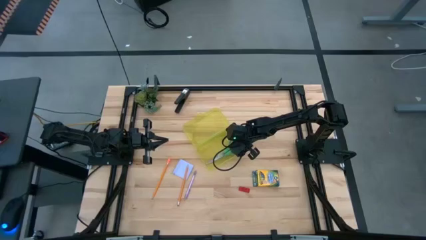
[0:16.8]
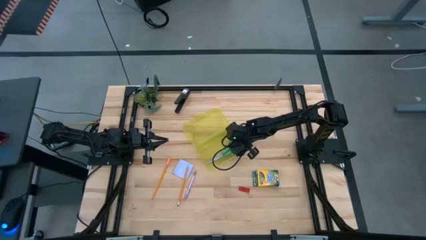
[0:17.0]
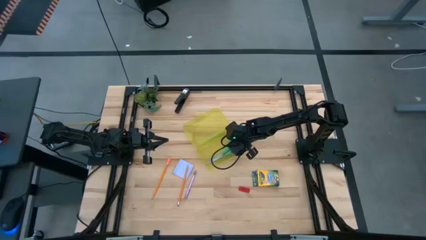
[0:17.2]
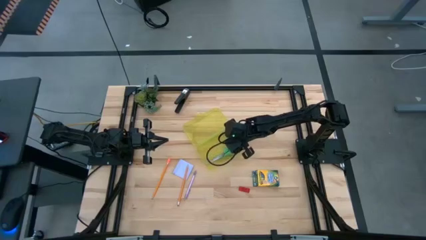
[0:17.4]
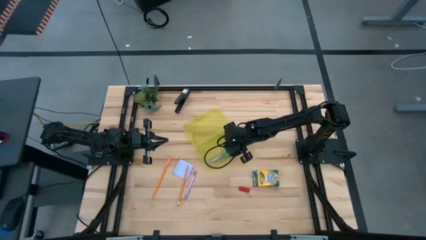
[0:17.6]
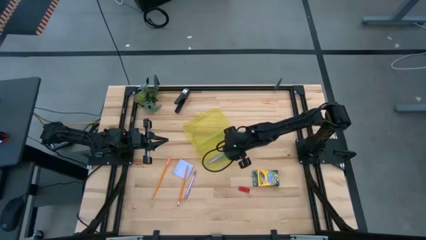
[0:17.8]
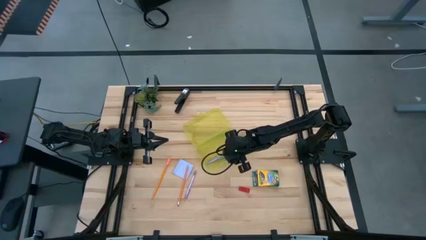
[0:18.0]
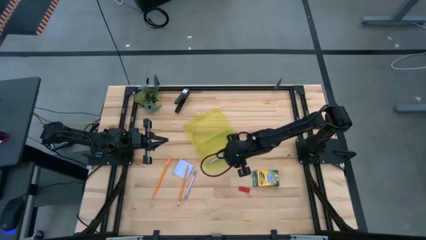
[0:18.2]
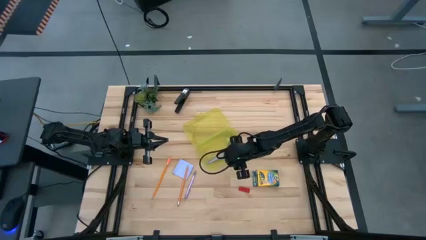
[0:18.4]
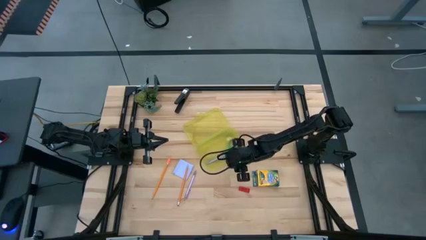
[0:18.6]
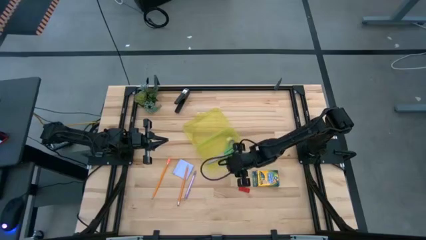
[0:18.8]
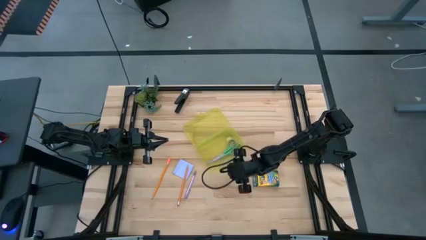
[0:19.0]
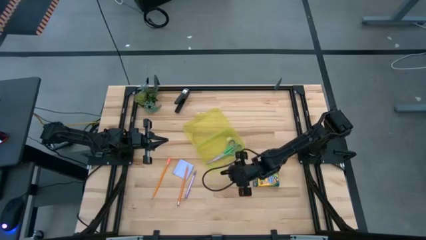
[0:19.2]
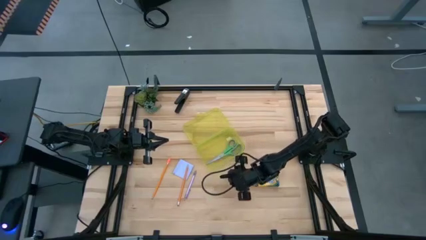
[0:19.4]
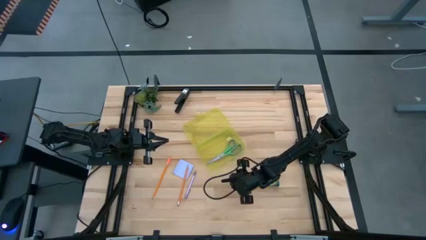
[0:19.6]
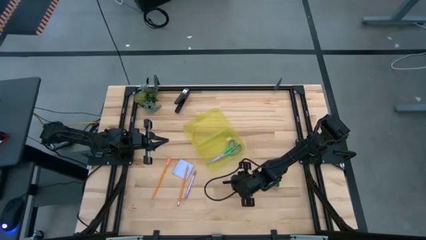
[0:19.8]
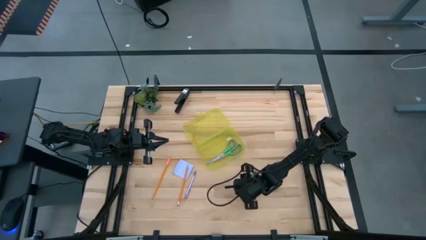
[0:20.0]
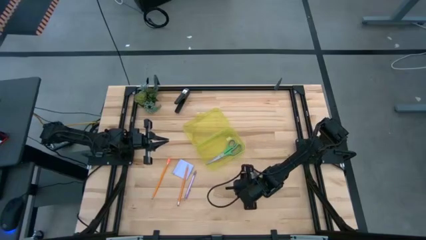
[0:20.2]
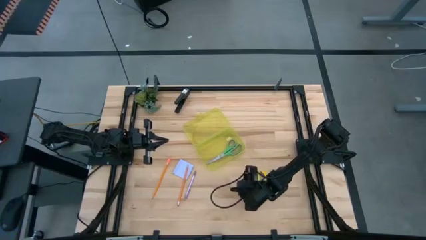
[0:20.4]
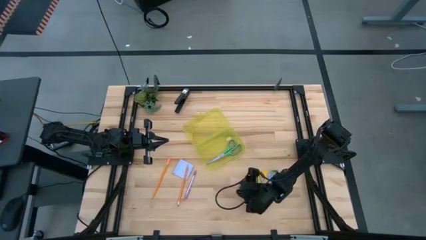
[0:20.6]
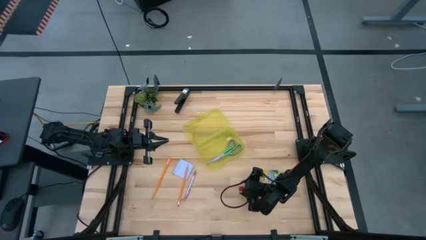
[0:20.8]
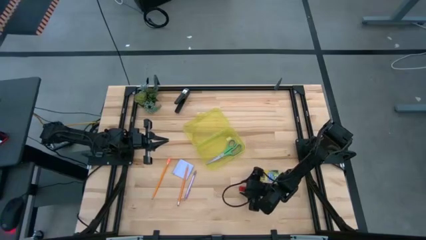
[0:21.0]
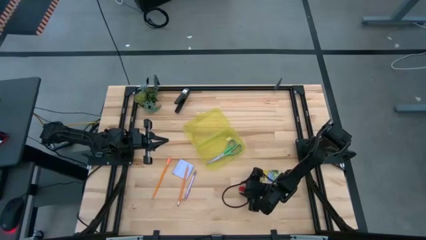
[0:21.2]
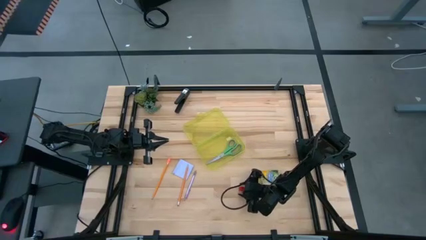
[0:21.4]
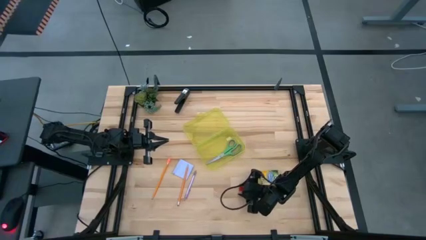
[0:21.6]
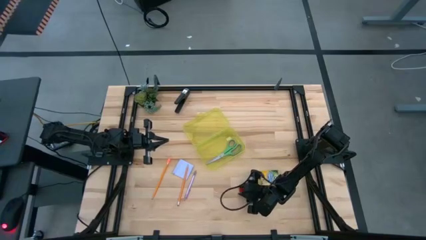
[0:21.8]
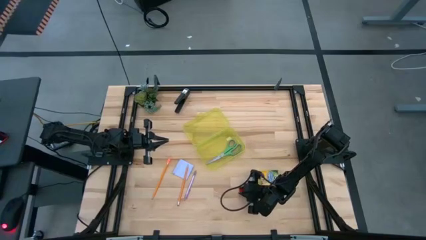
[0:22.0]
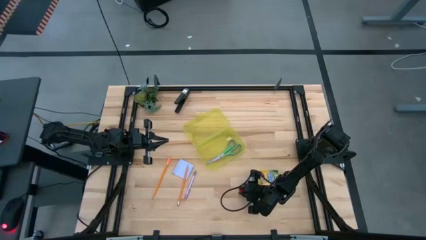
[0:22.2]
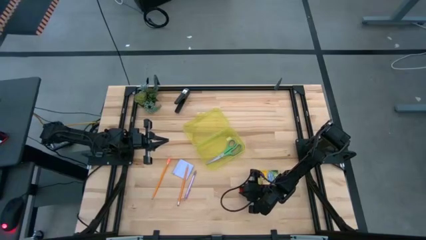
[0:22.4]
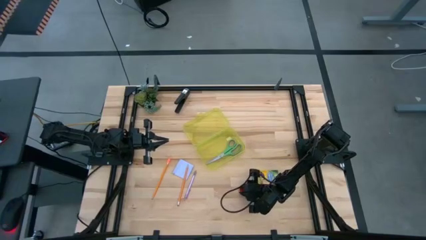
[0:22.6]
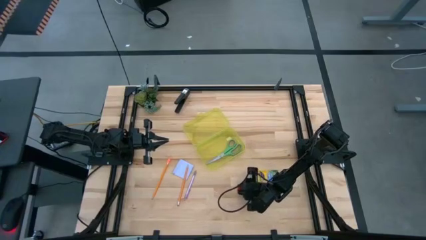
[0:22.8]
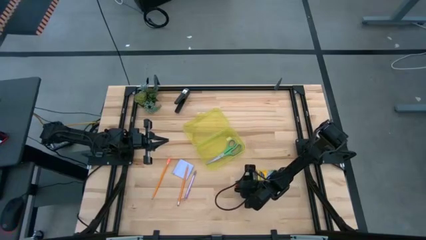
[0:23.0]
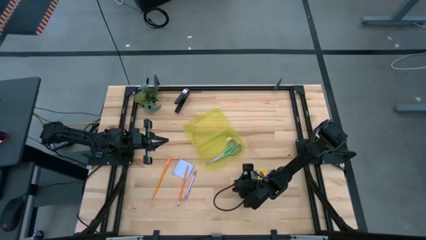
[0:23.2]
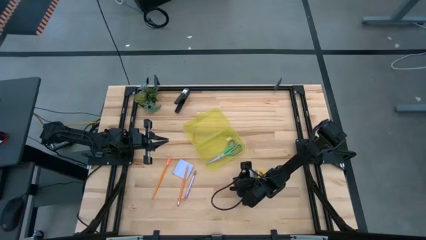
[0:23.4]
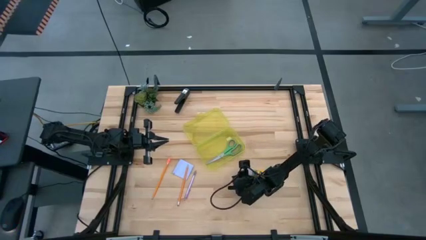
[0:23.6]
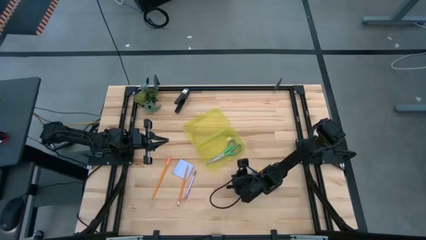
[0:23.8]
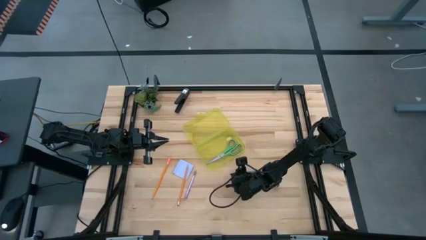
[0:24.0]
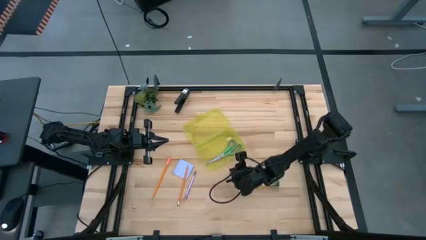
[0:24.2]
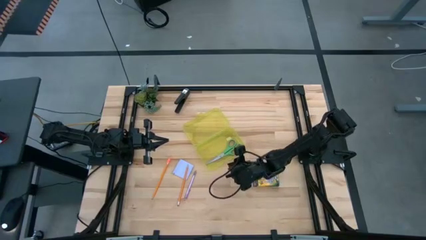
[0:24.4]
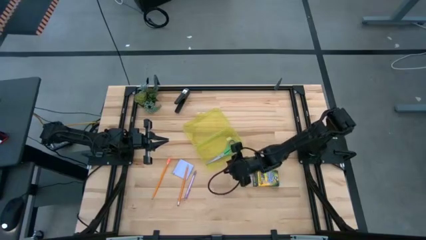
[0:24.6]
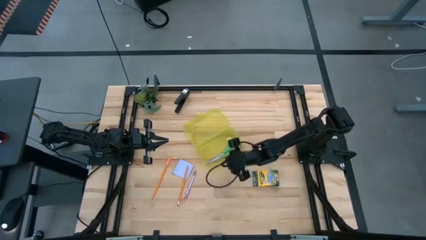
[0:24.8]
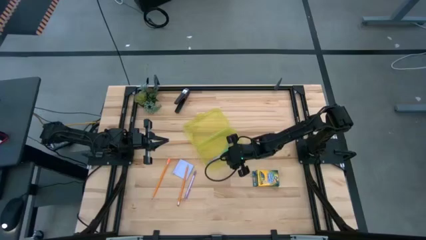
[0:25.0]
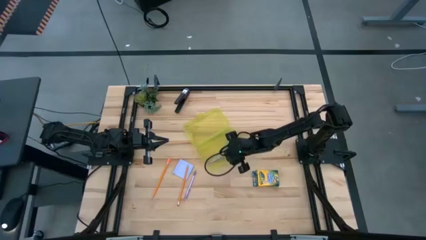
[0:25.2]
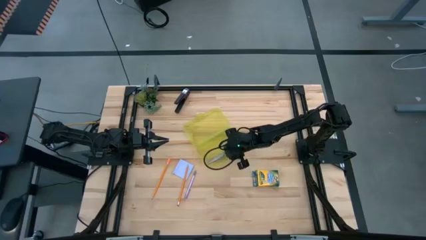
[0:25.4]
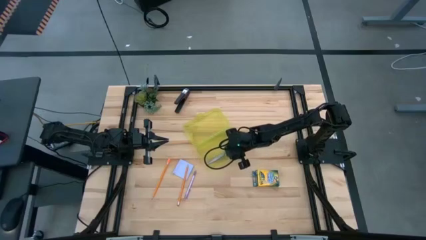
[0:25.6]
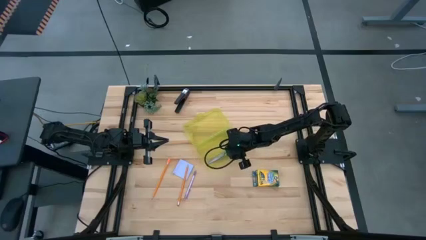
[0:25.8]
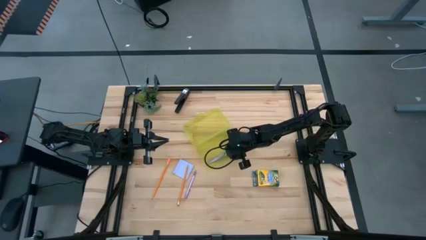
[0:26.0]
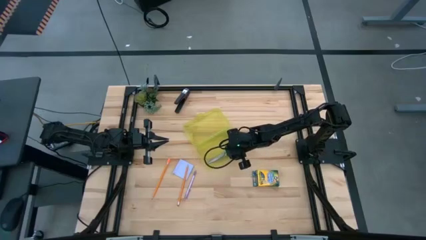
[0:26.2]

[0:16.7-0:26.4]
Task: Pack school essentials
Put the red eraser into the yellow supply box

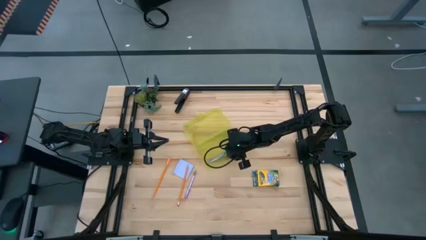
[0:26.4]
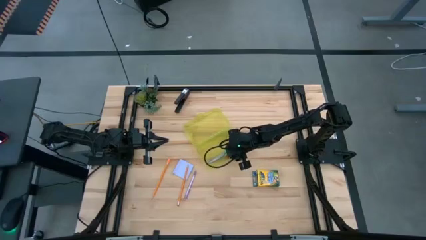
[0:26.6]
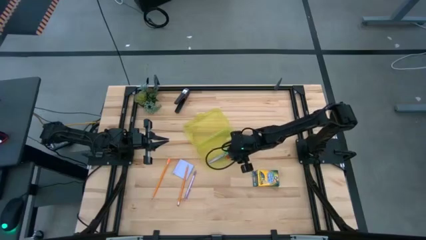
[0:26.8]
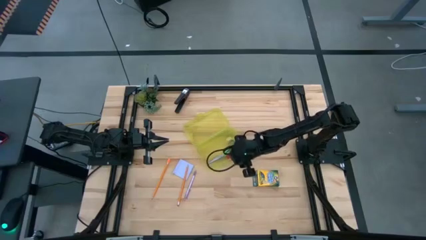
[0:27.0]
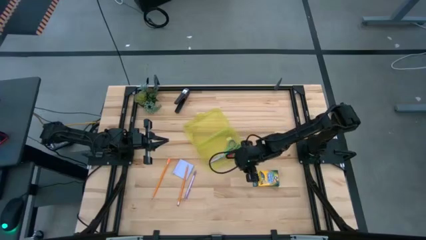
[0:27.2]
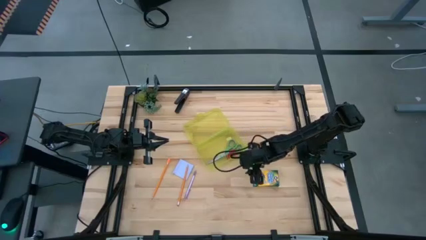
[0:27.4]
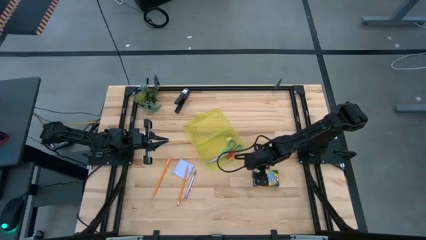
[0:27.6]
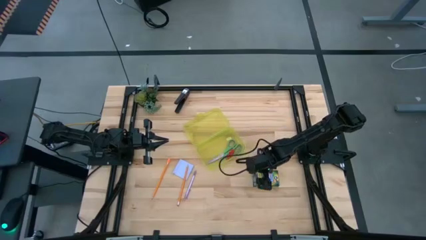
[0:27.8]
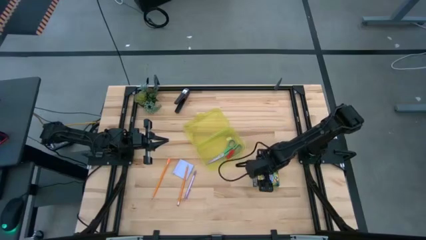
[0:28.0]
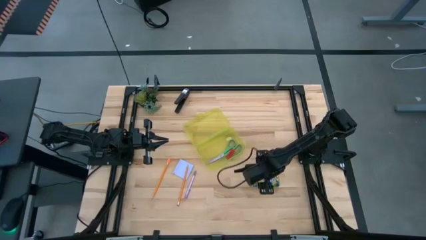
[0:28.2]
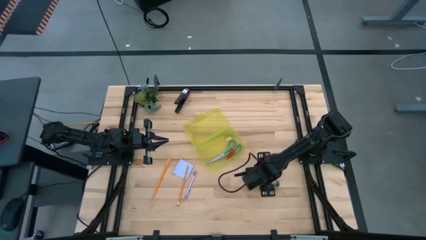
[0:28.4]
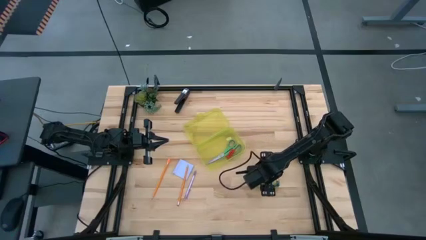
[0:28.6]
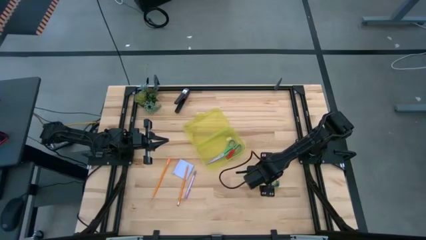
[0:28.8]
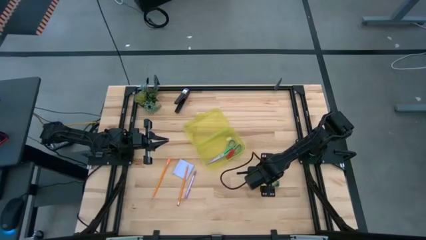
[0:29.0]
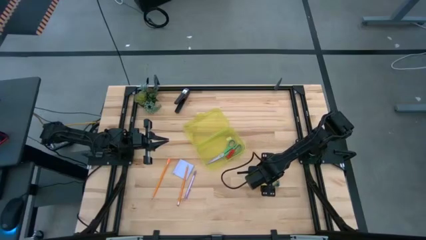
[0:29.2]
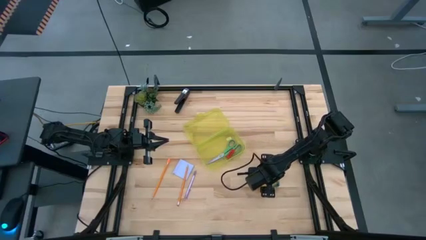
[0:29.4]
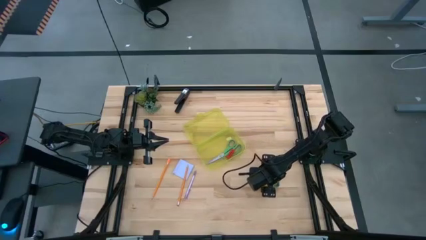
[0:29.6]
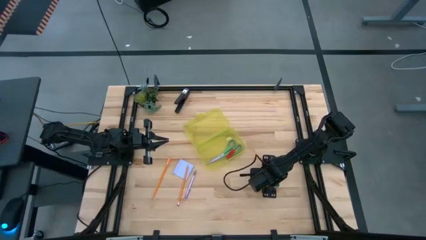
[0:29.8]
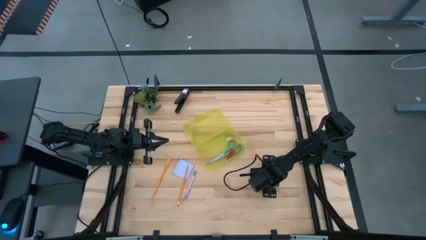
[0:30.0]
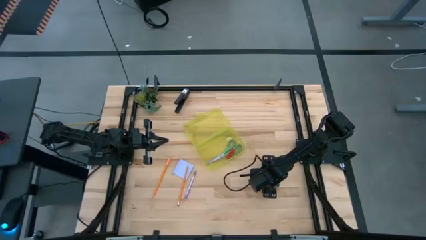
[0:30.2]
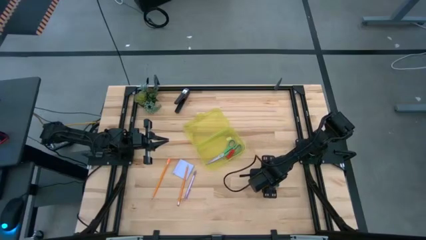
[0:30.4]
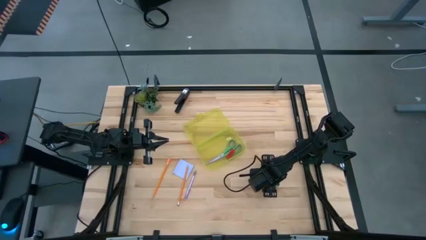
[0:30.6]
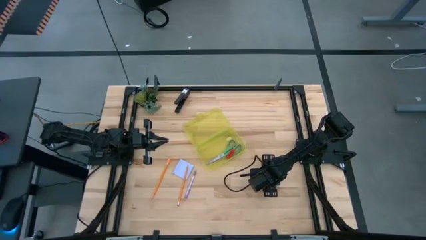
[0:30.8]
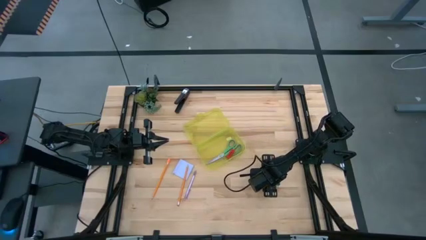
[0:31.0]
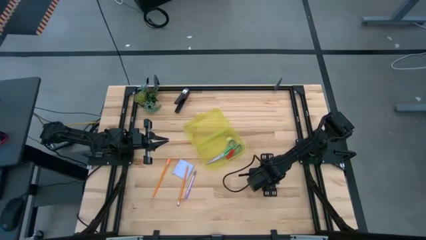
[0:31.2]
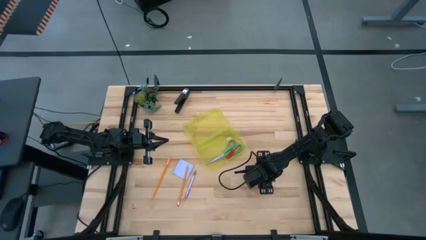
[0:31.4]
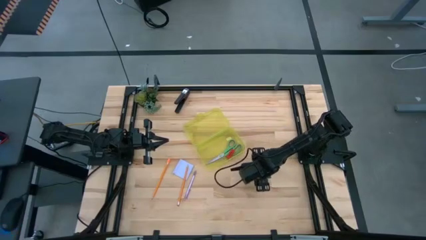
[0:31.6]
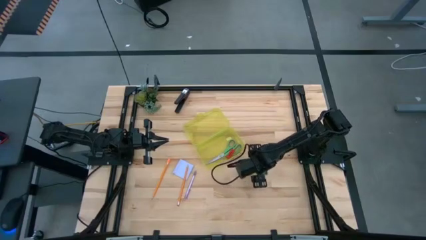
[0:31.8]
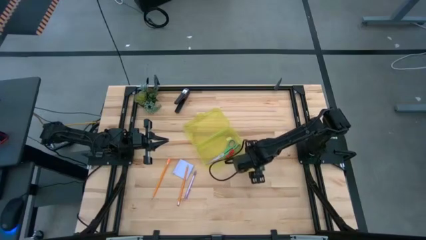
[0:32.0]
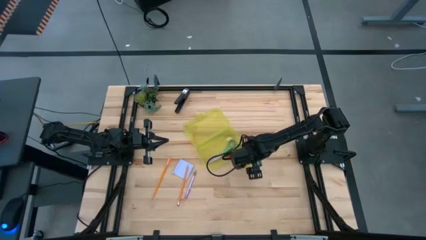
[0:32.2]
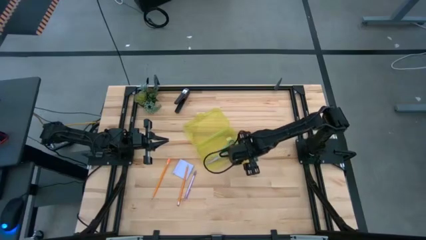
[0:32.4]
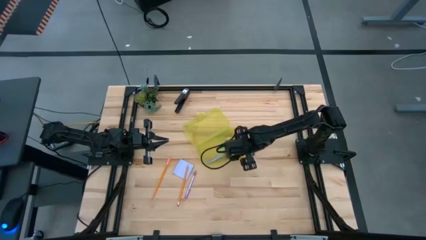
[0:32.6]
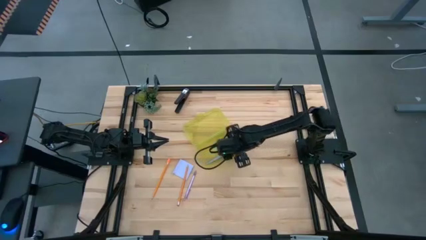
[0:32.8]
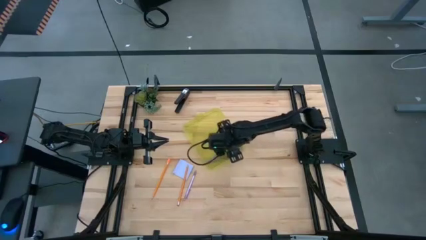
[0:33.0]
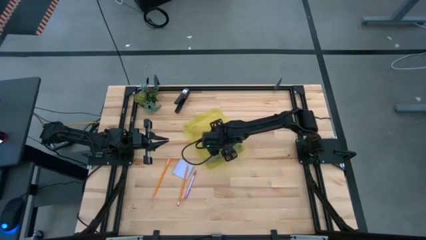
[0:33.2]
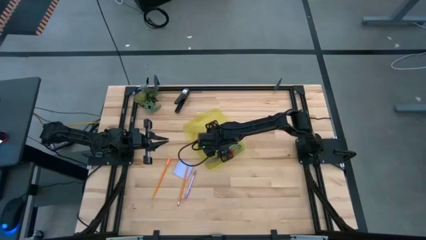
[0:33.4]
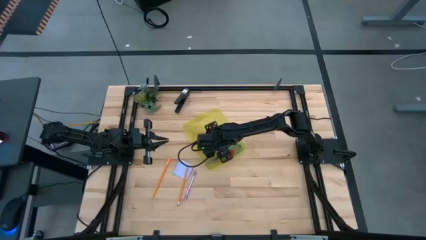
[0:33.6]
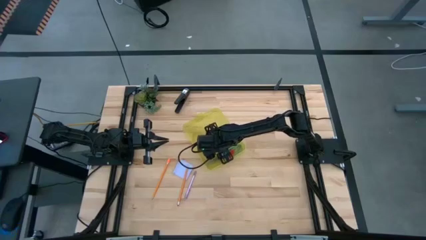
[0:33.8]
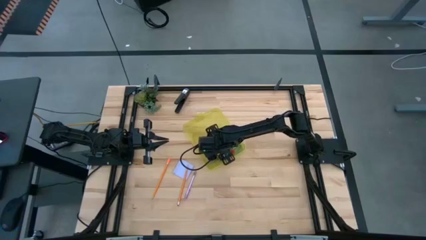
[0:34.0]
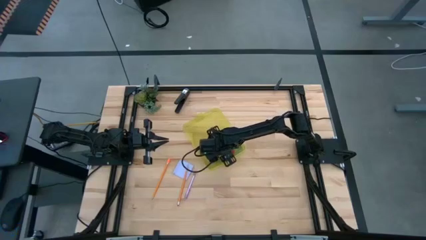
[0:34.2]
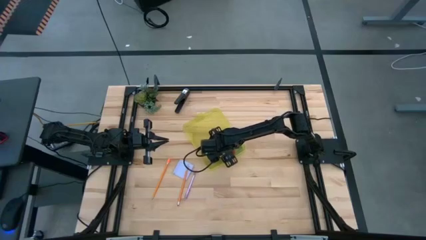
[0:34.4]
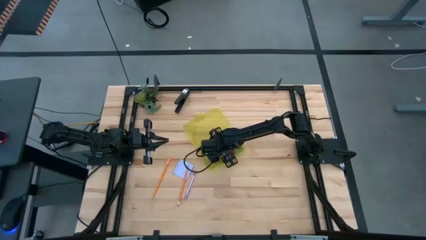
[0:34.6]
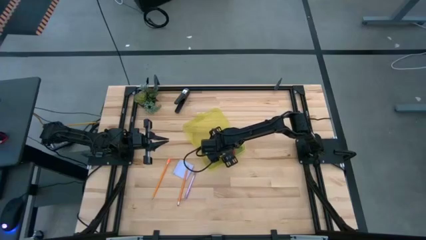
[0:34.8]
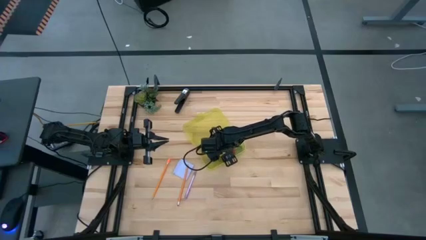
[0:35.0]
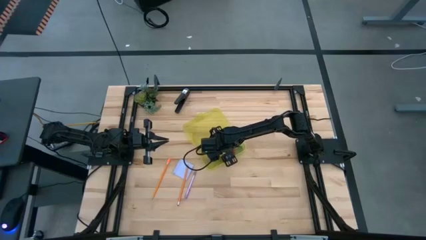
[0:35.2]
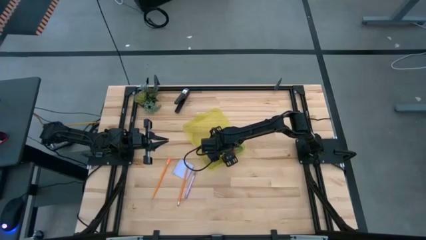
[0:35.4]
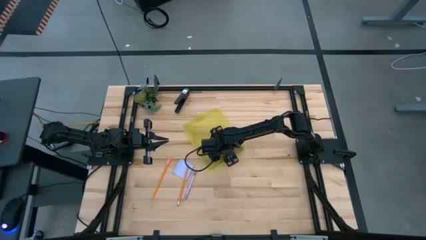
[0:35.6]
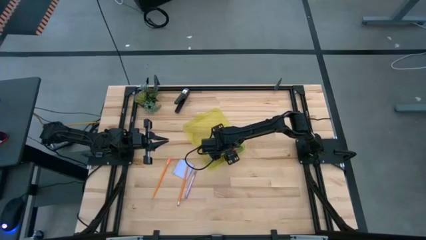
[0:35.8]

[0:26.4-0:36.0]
Put the crayon box into the yellow supply box
